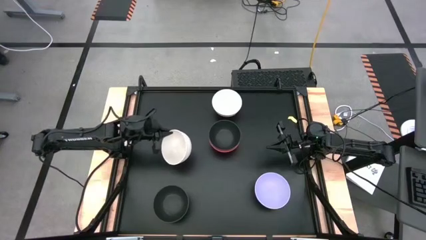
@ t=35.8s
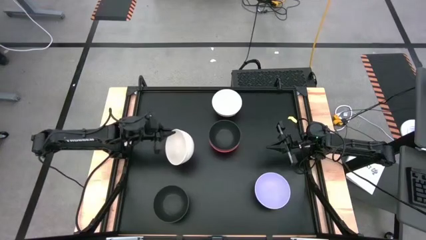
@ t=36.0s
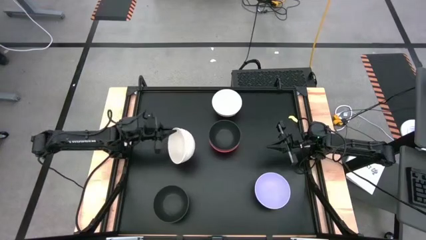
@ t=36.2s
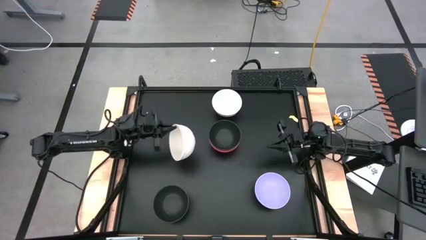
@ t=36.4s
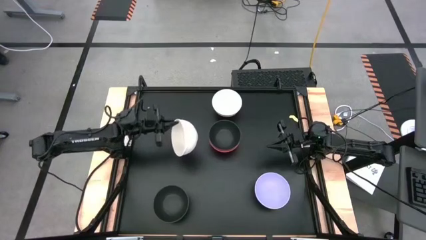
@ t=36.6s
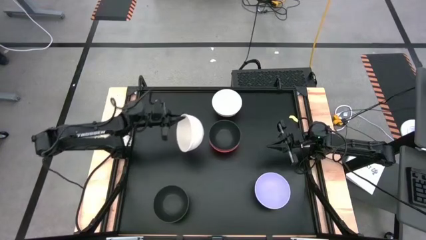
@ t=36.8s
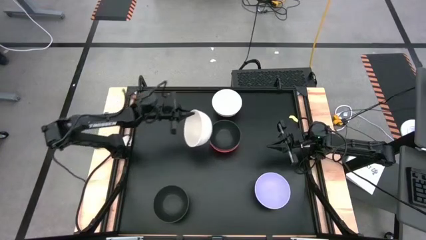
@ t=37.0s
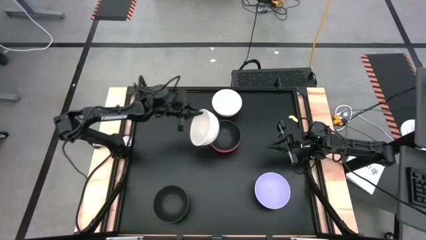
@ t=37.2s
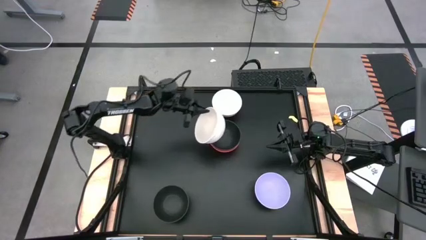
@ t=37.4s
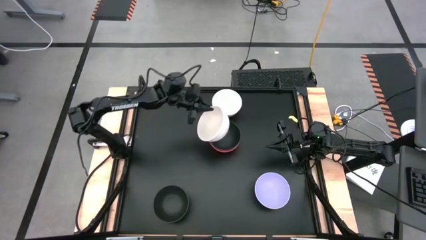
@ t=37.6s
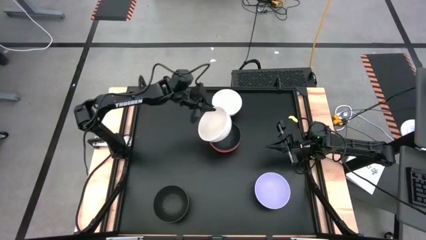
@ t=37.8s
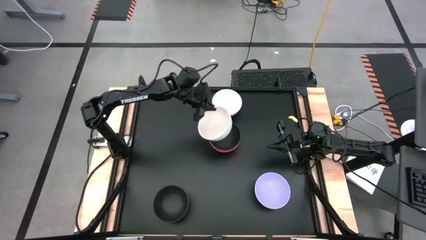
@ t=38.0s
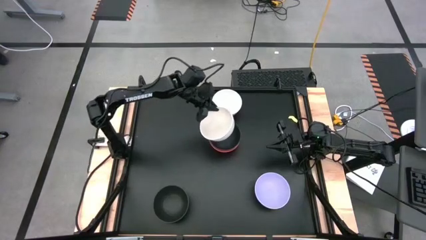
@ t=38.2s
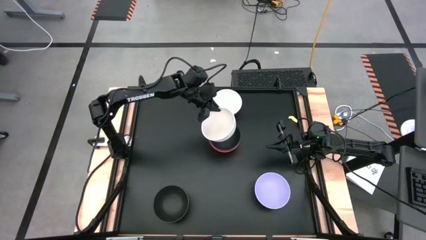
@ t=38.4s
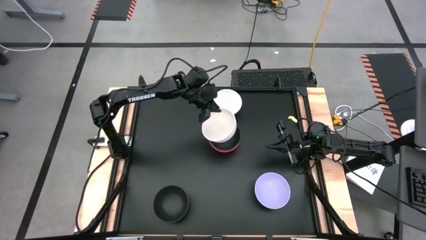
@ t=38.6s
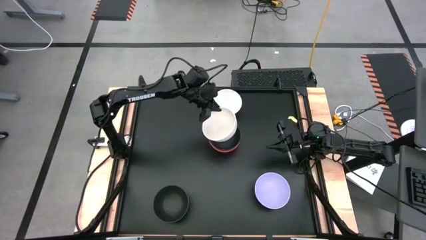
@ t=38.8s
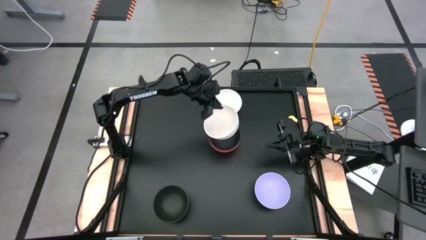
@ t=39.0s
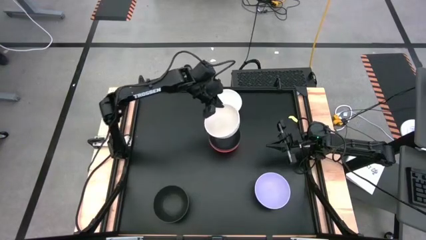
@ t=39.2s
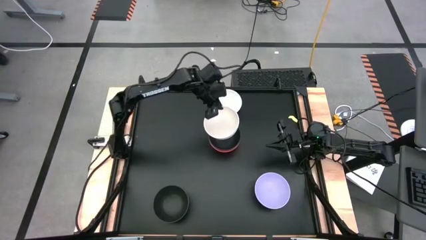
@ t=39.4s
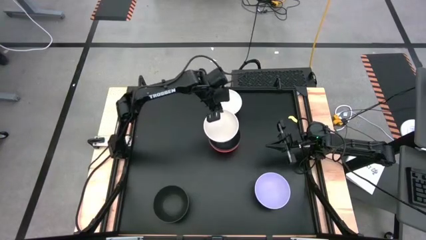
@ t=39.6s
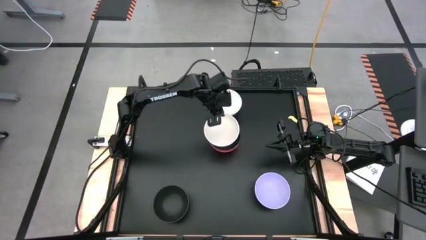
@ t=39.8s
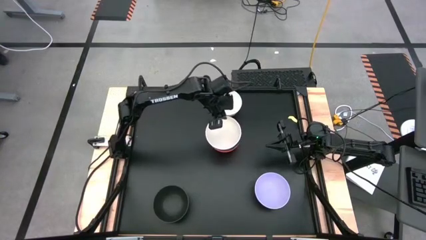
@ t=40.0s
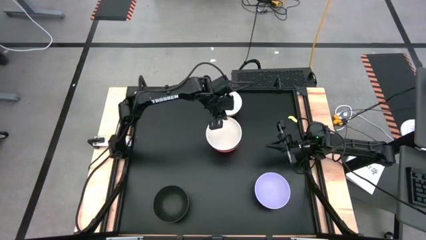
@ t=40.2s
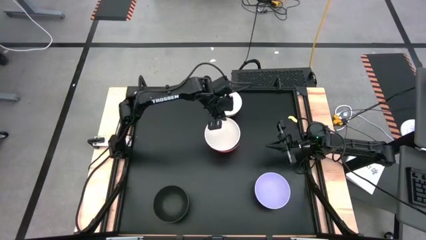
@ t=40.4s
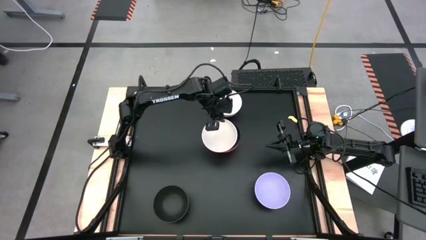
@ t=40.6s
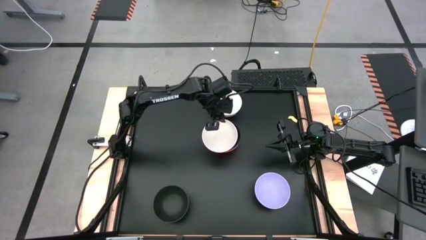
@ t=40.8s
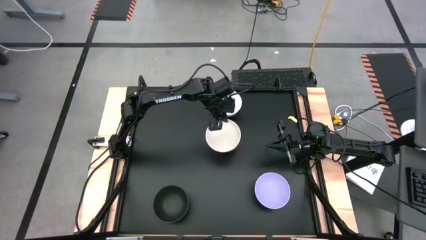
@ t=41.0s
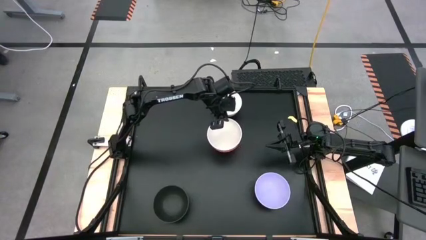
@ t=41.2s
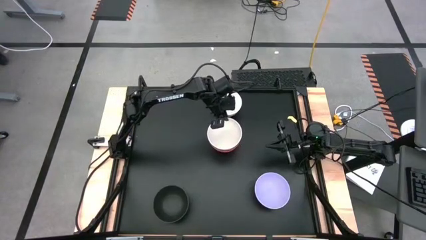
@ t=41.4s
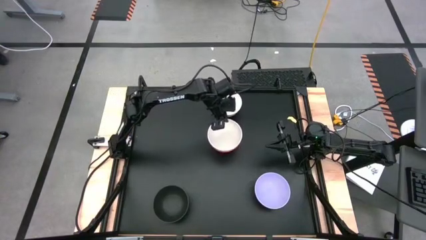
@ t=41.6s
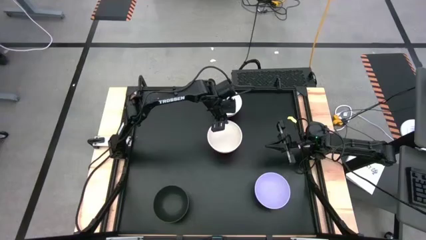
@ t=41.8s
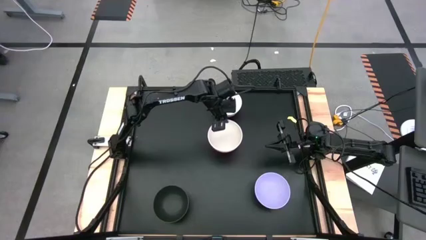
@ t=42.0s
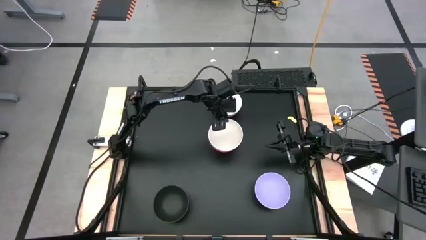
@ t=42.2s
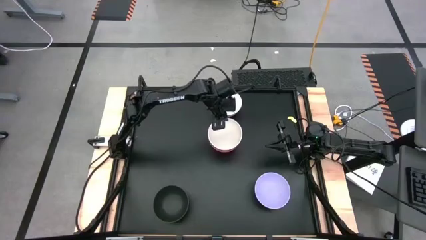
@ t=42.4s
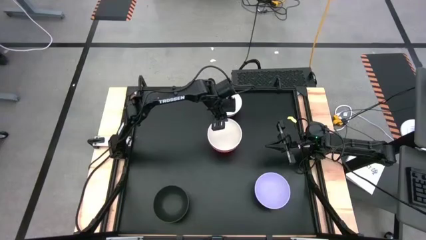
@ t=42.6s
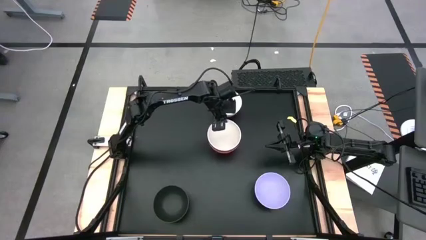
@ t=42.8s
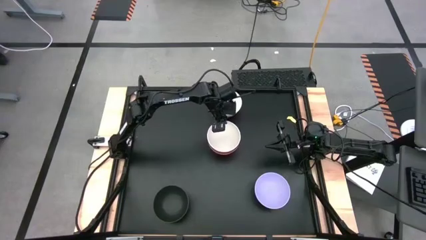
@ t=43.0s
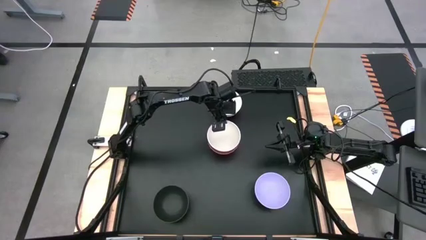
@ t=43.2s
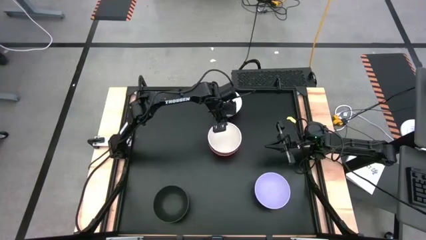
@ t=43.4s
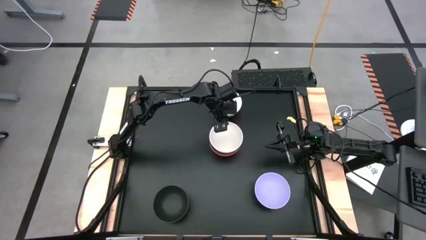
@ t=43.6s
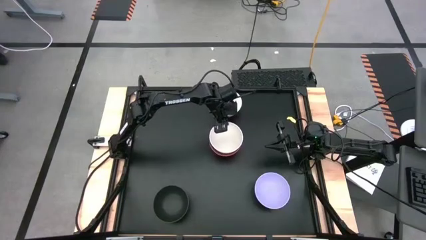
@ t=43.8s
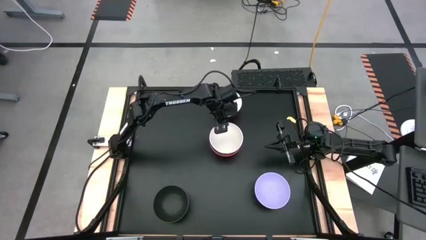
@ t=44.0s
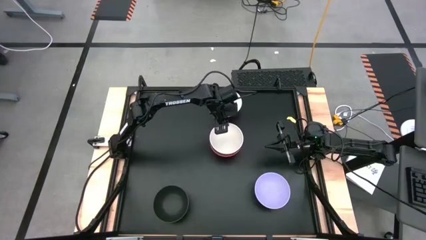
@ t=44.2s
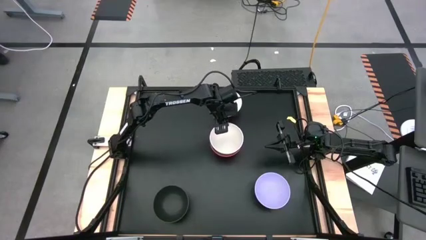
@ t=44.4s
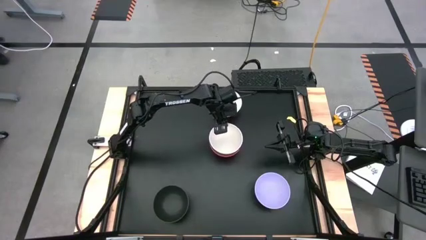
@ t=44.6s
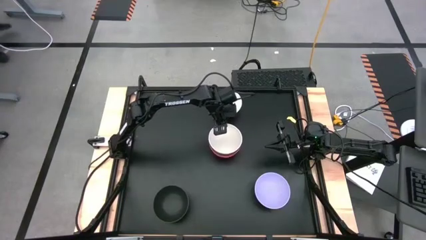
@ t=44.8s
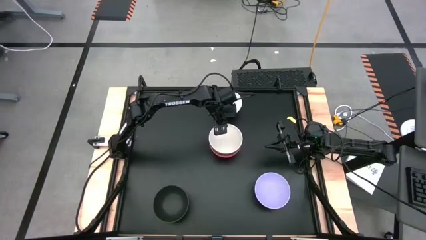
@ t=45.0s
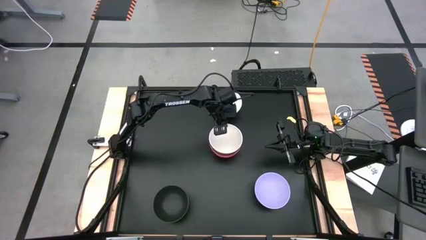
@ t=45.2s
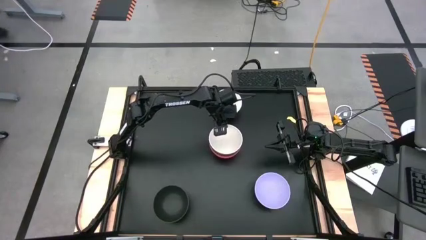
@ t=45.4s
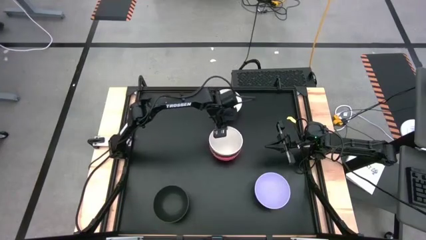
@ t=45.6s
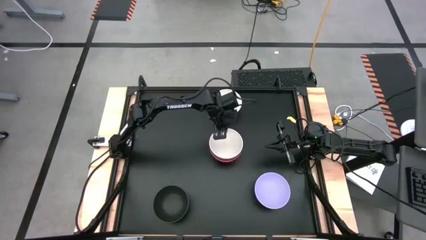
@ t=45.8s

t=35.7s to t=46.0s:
Task: Nest bowls inside each other
Stack the bottom white bowl on top of the black bowl

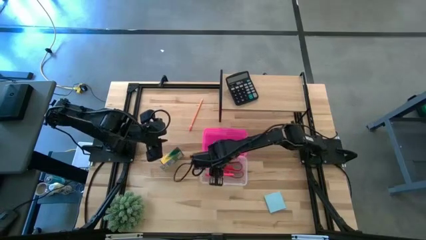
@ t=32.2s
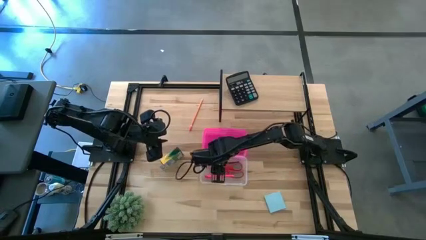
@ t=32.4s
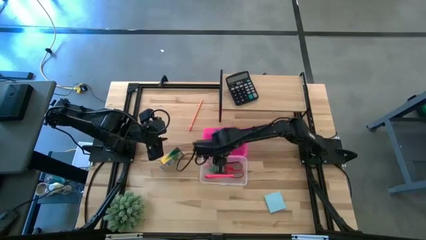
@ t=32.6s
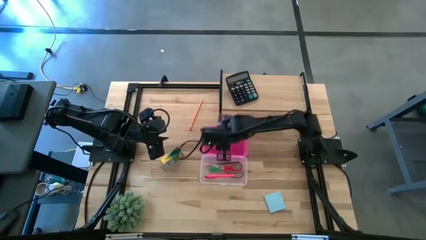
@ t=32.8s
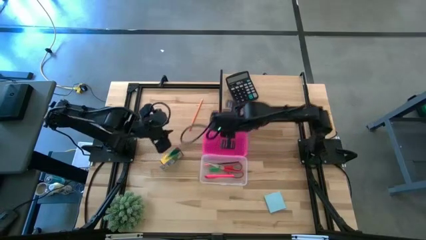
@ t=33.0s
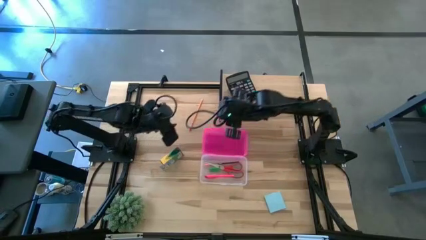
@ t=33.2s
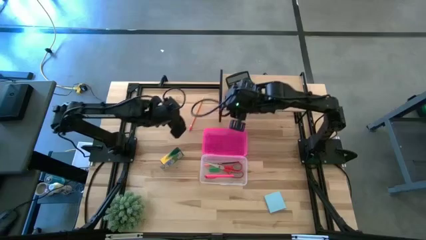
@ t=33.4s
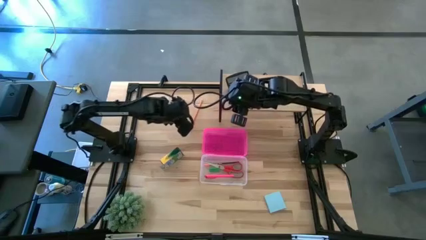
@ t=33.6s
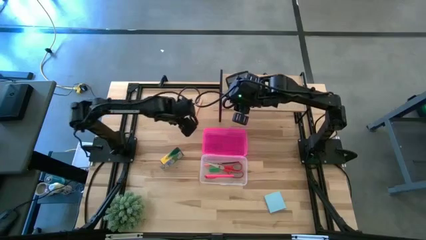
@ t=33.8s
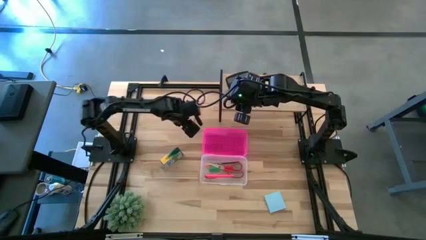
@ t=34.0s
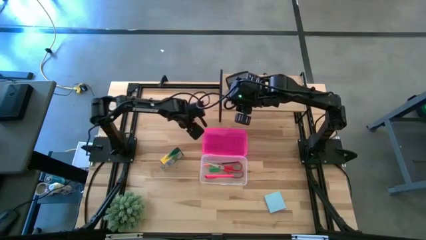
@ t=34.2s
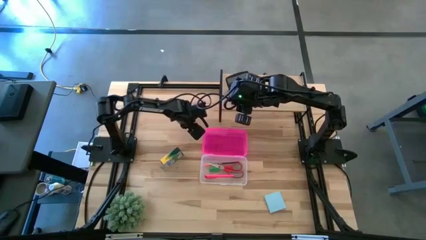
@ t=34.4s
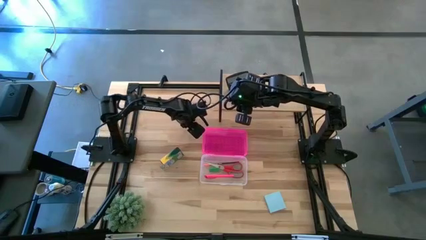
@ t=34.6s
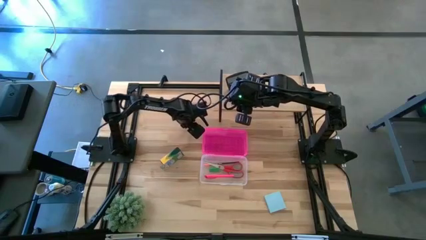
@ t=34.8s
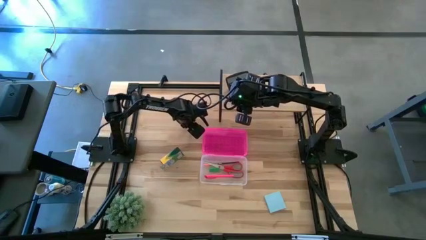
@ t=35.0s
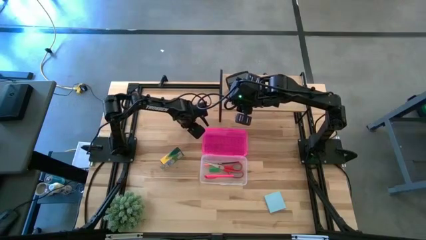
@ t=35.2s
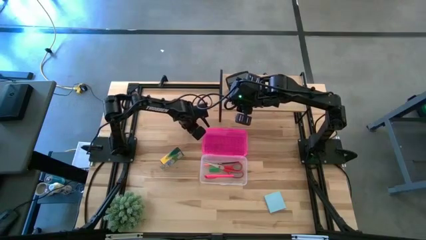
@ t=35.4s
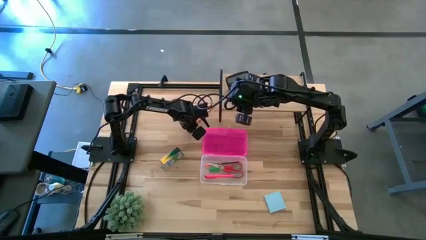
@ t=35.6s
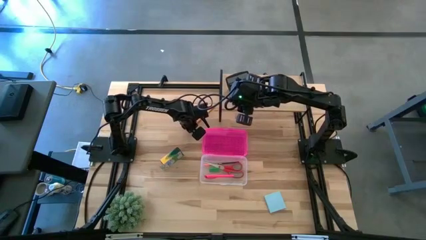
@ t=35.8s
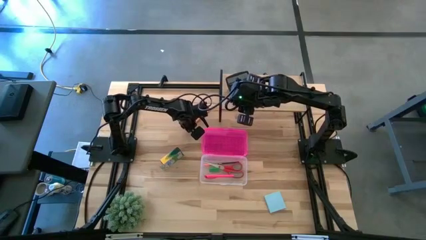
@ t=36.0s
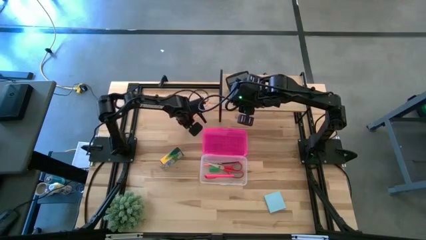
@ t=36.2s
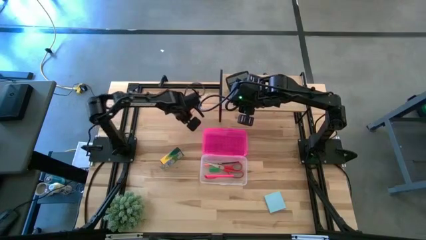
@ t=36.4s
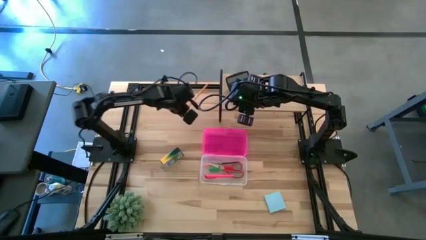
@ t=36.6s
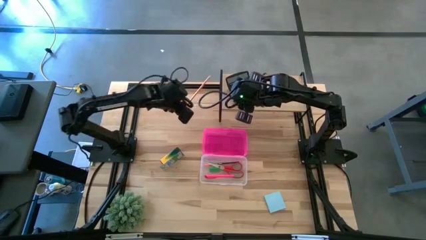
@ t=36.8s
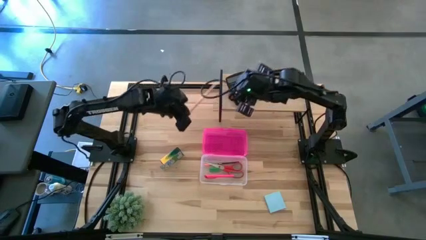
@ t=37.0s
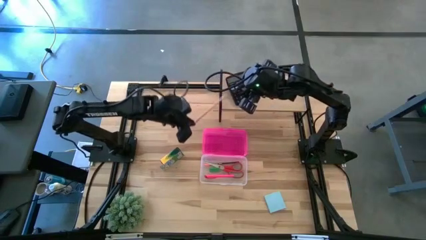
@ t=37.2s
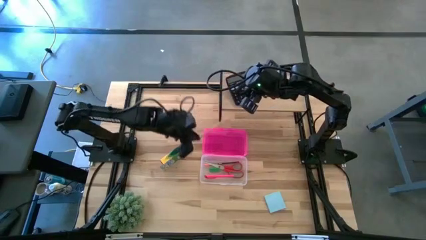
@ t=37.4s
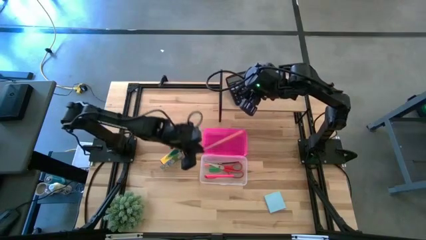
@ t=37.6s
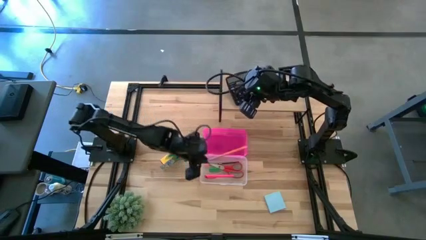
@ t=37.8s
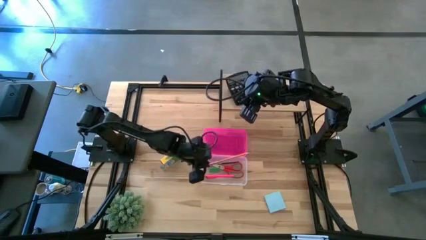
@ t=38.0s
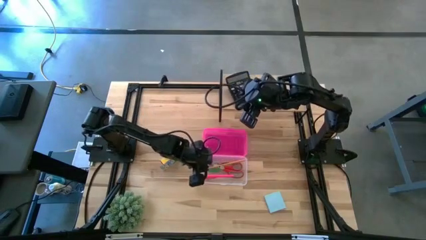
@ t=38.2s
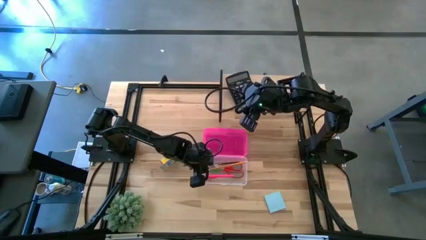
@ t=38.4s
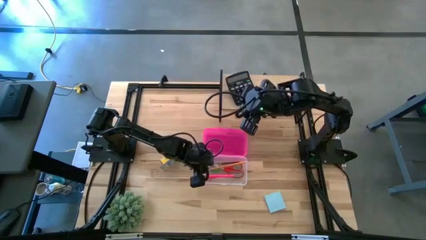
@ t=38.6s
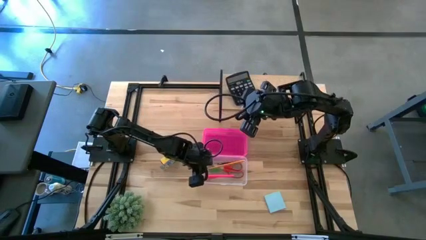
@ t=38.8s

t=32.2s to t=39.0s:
Task: Pack school essentials
Put the yellow pencil into the supply box
